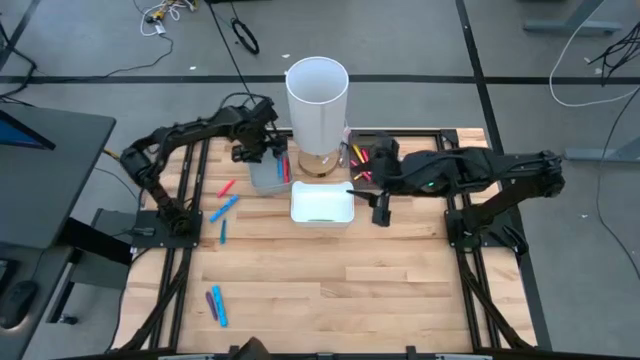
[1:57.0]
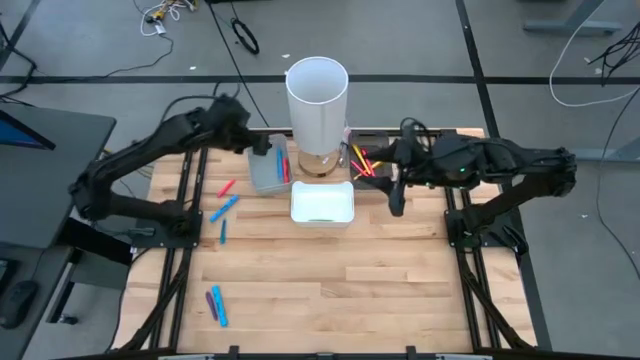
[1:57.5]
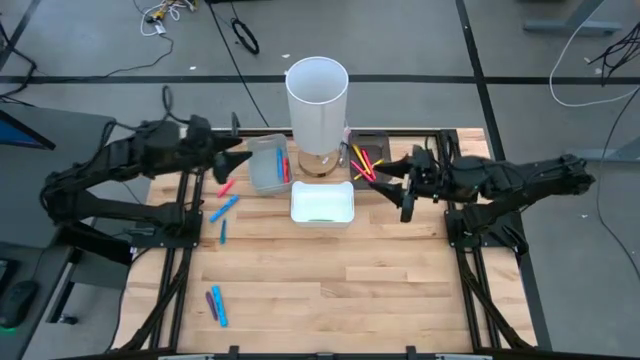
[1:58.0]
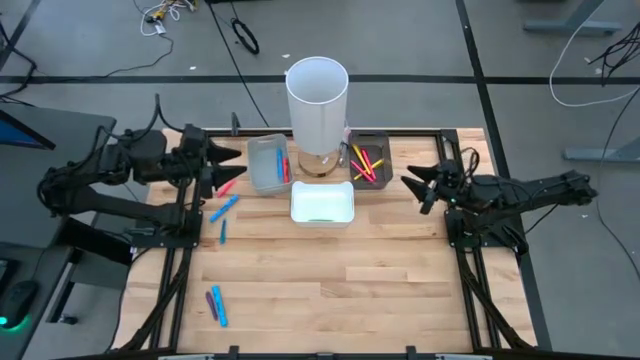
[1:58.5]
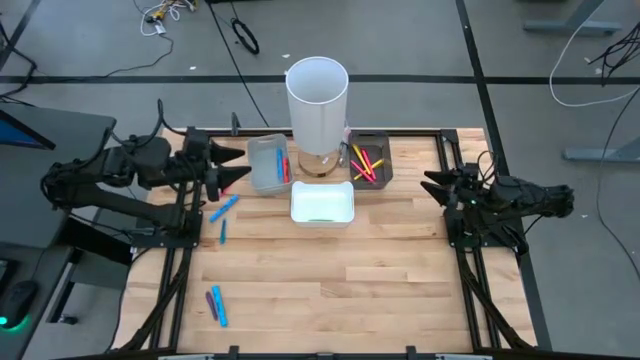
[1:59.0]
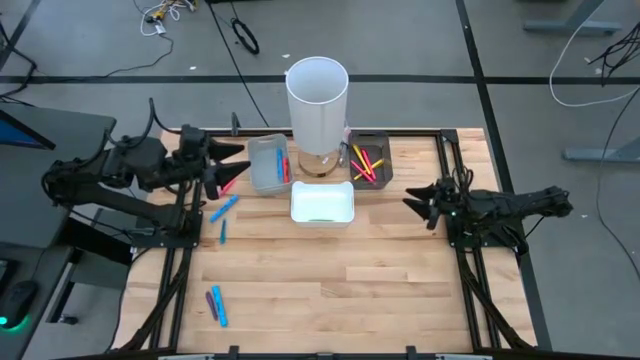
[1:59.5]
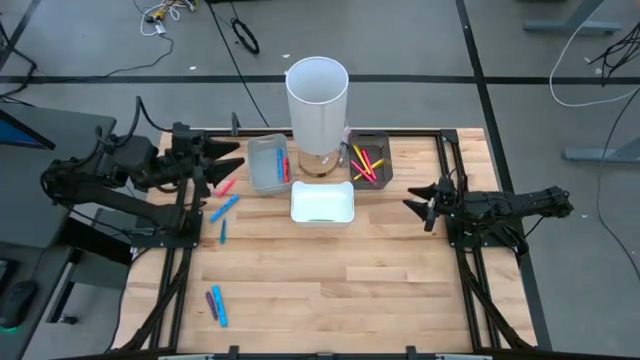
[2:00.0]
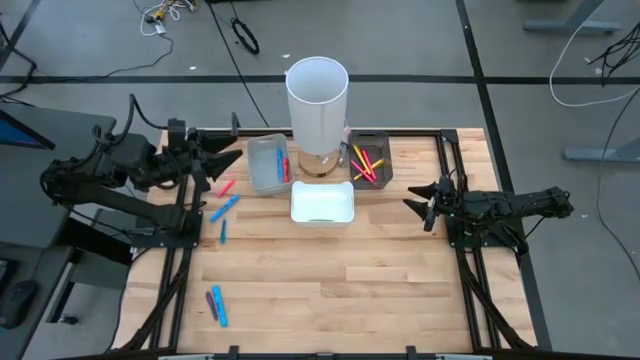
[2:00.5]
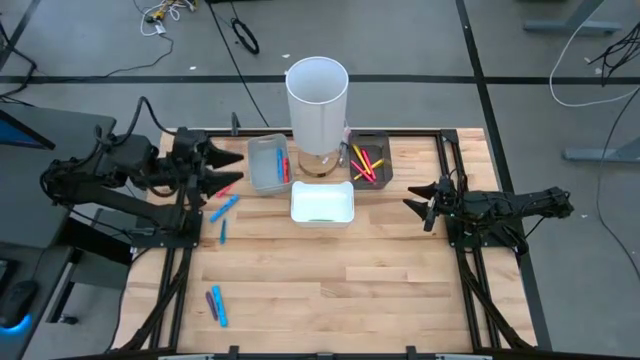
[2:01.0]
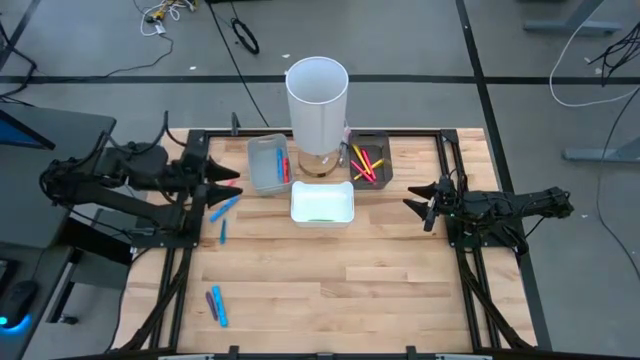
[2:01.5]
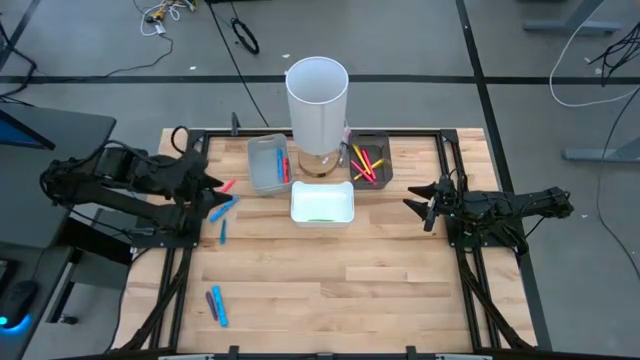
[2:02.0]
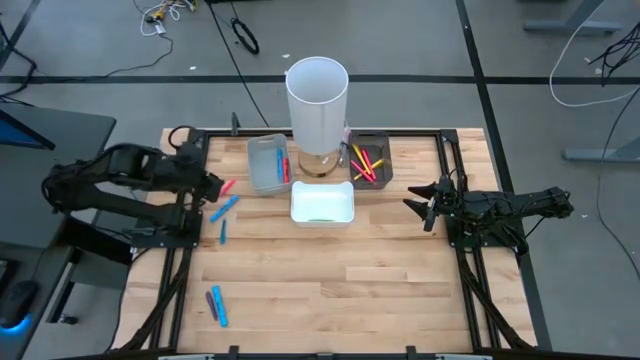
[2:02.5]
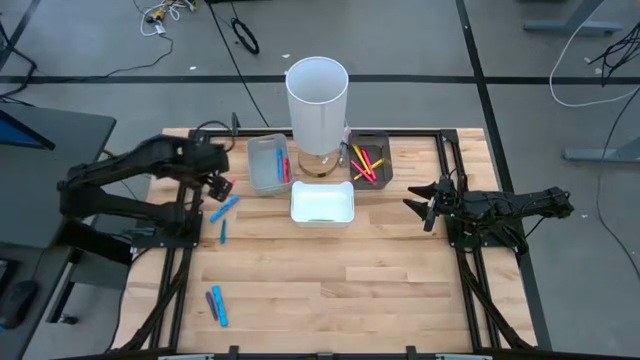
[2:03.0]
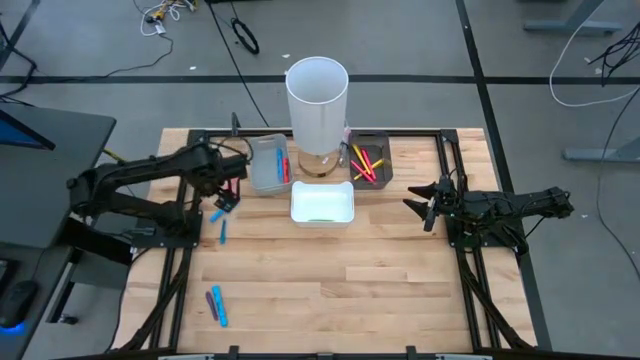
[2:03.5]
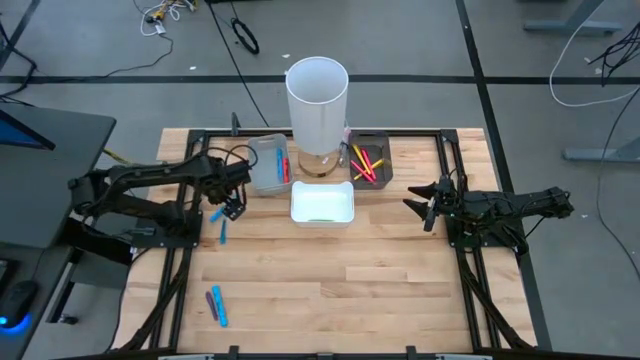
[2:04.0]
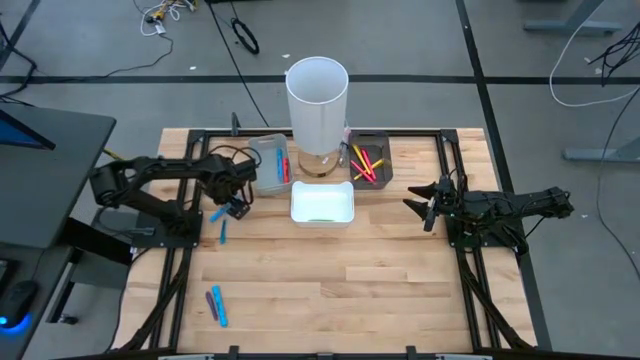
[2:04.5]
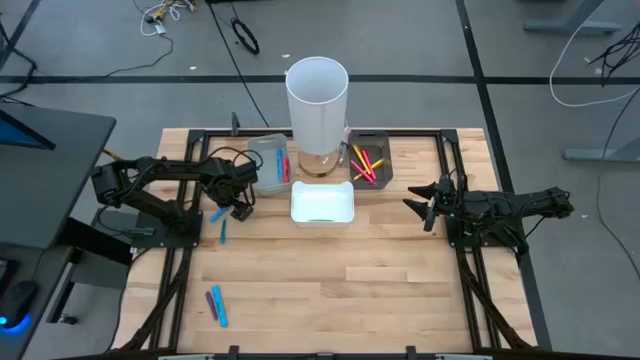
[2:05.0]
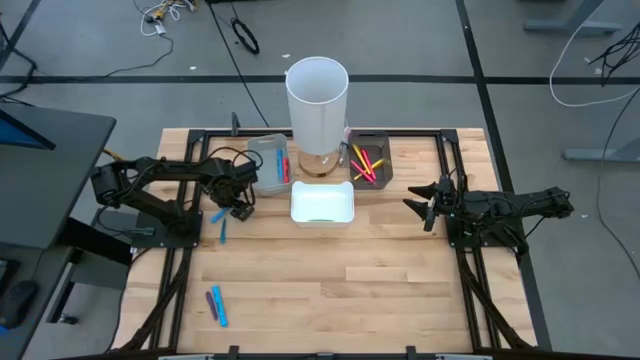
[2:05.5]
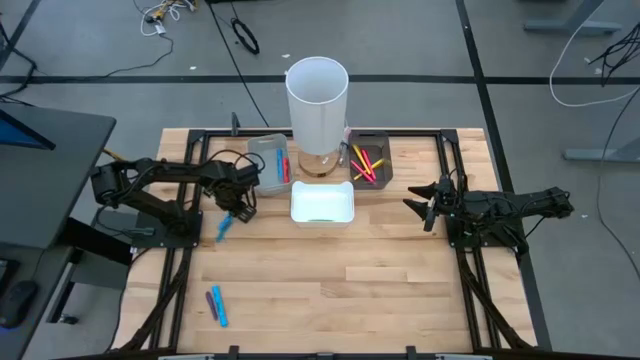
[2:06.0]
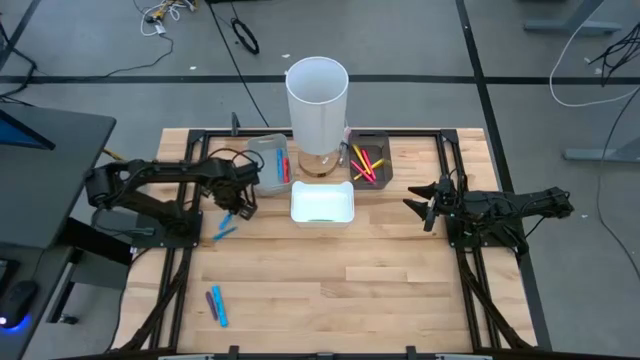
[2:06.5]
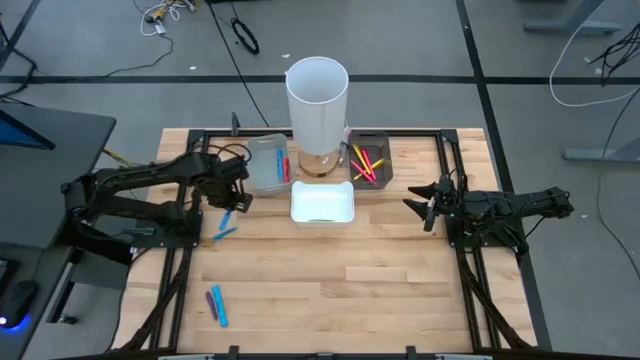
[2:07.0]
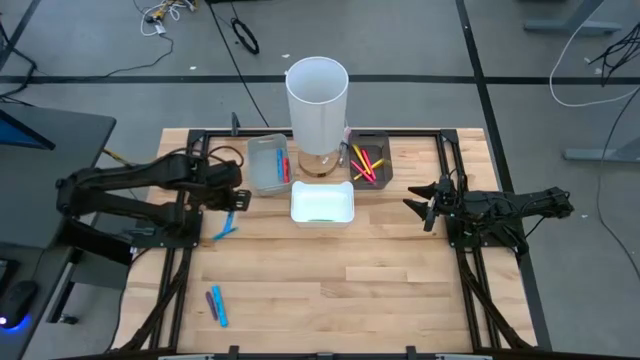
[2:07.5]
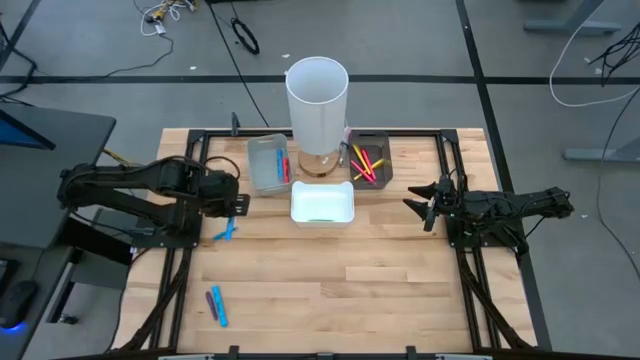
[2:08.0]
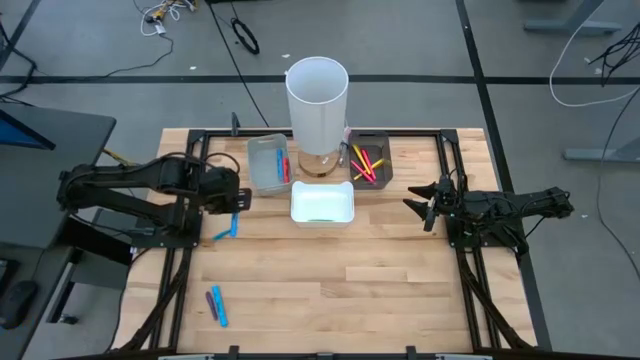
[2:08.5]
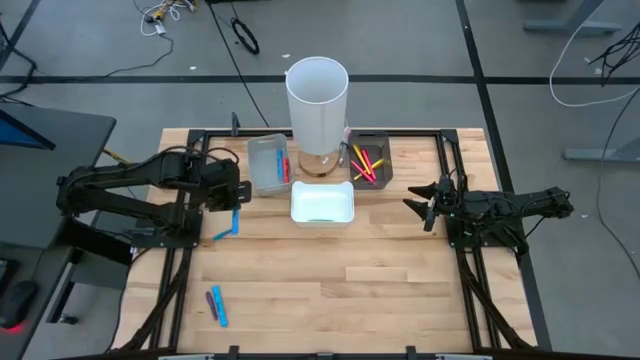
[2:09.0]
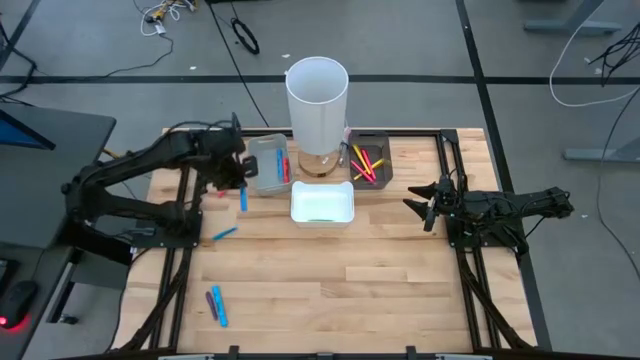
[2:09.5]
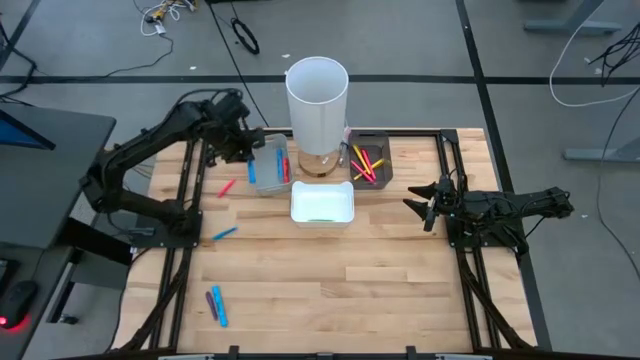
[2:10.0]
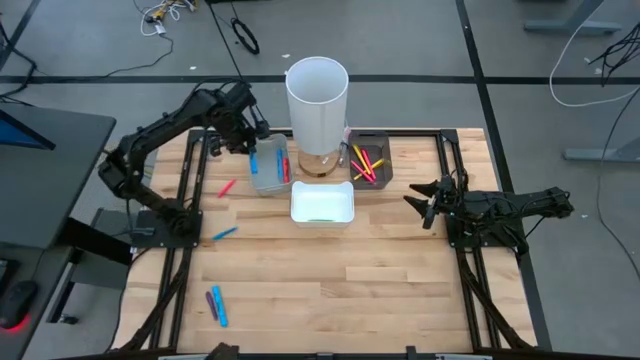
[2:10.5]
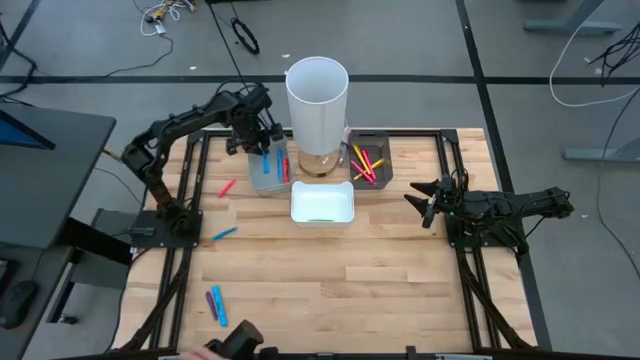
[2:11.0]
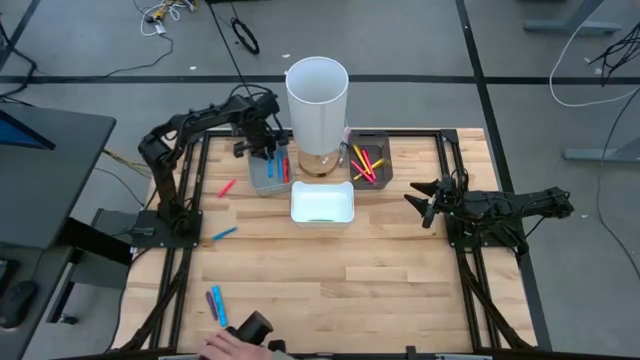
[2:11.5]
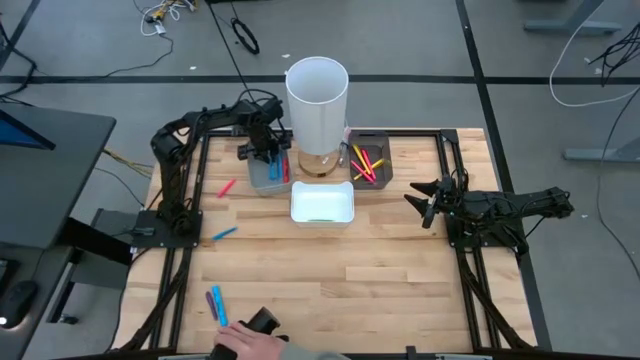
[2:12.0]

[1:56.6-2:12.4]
Task: Pick & Place Markers
Put the top blue highlighter pen into the gray bin

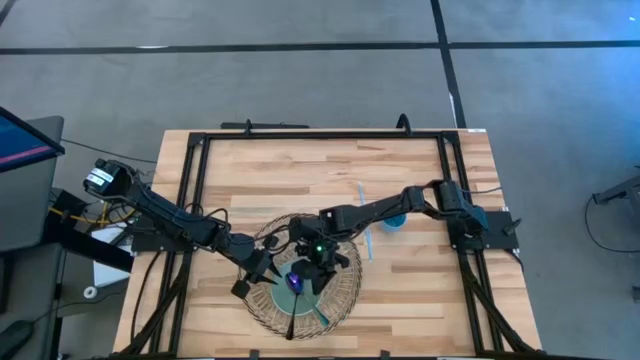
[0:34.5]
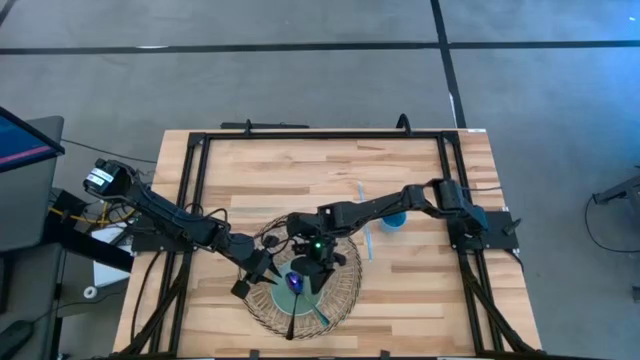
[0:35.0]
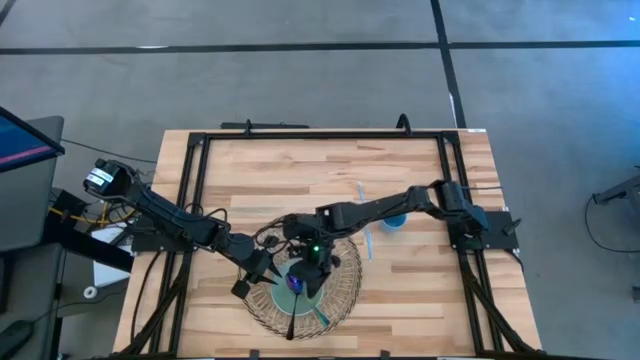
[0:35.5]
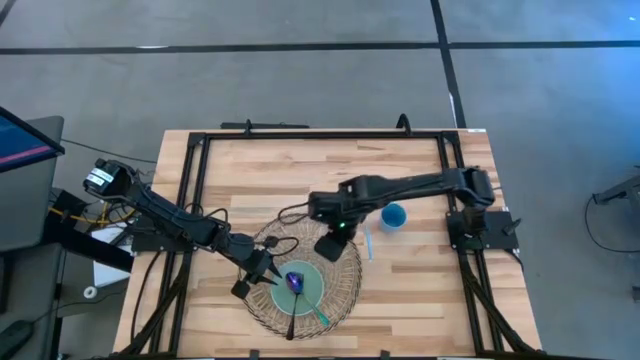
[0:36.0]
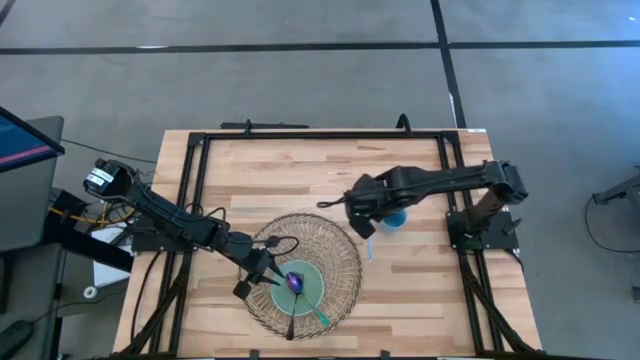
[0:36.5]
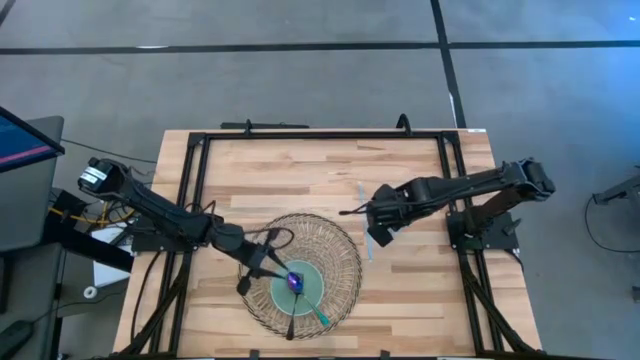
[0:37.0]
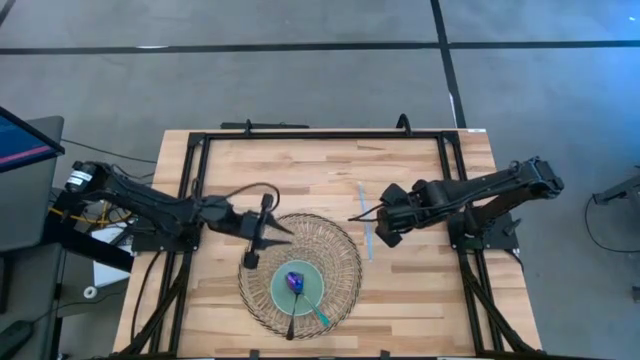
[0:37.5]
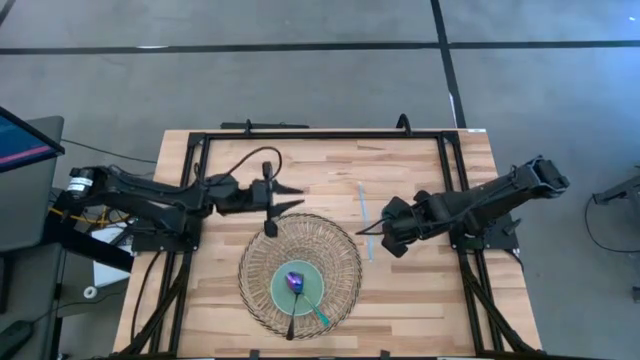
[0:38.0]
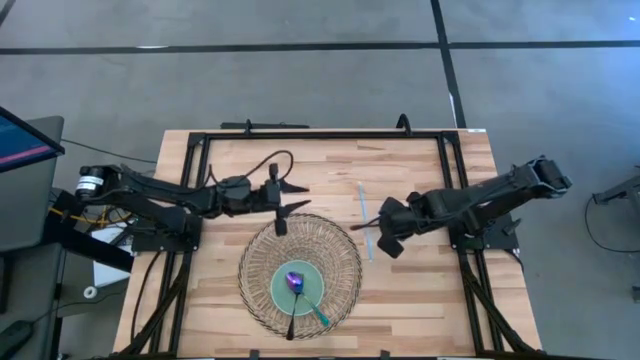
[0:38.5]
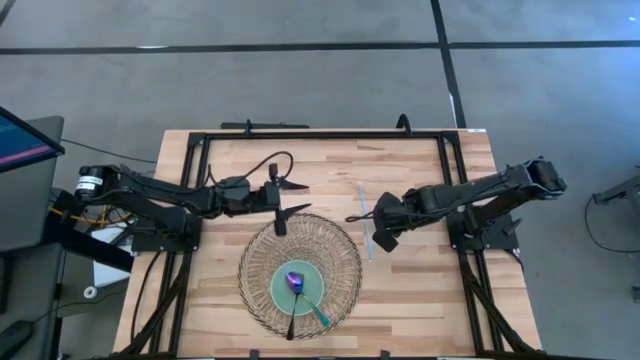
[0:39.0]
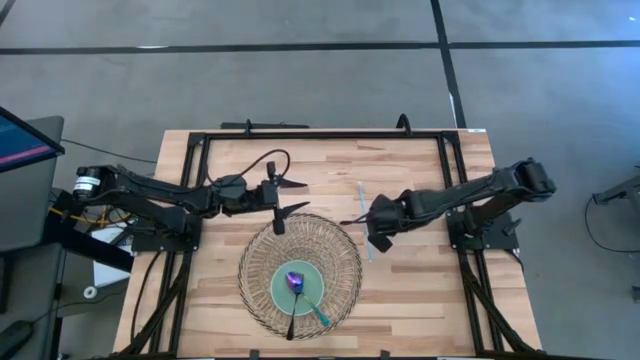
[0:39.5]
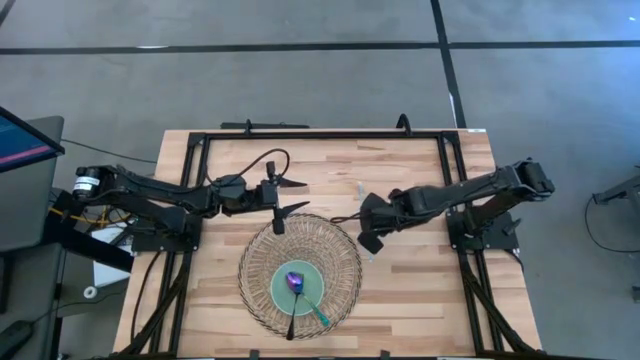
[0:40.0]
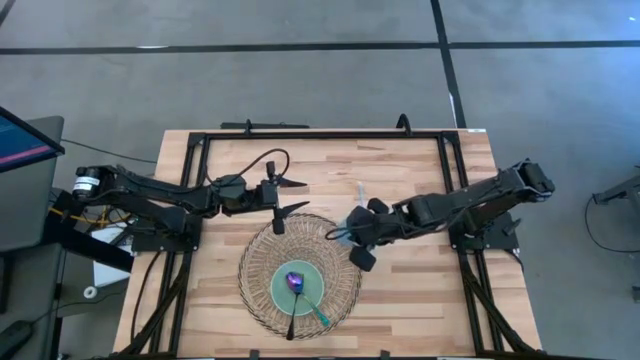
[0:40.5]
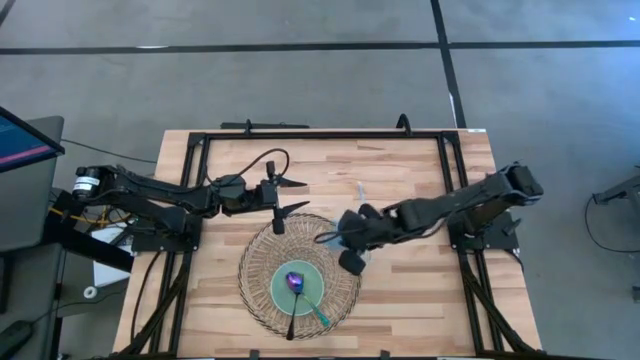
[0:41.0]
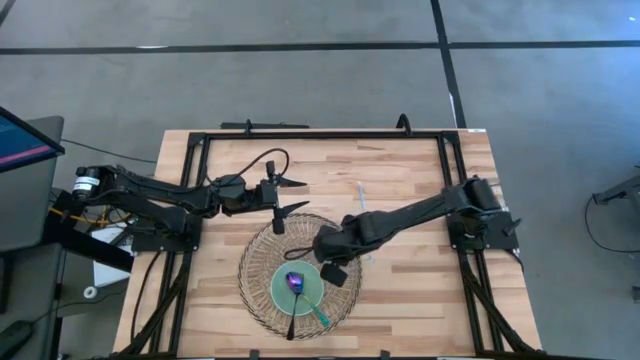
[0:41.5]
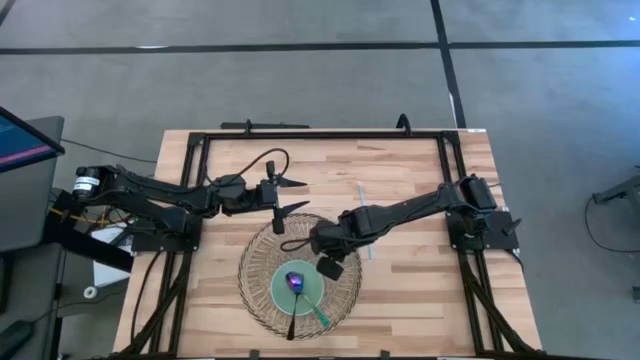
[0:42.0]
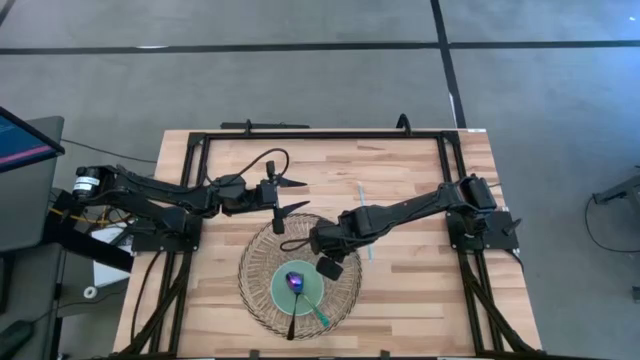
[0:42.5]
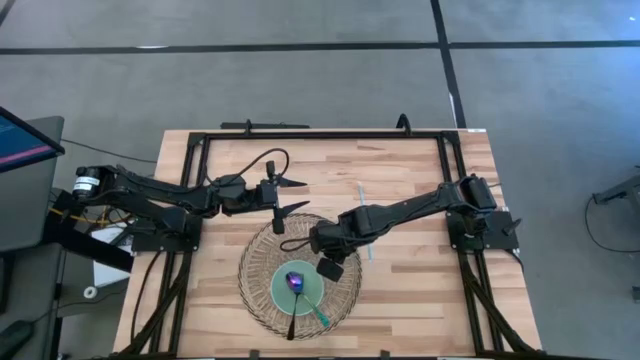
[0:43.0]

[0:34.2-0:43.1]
Task: Pick & Place Utensil
Put the blue cup on the brown mat to the top right of the green bowl
